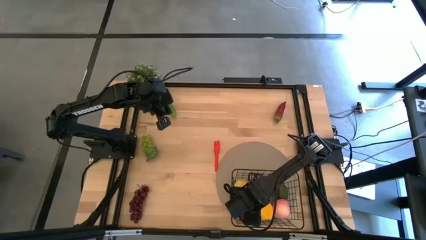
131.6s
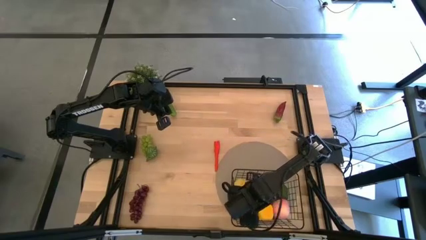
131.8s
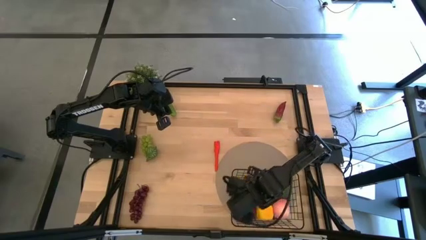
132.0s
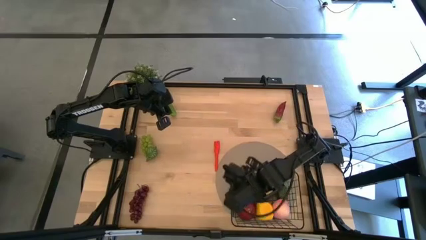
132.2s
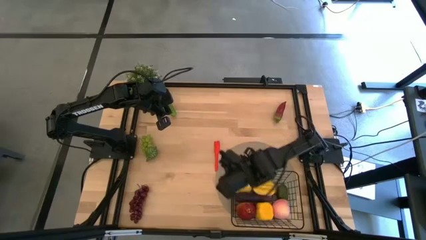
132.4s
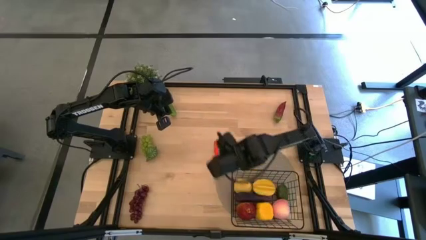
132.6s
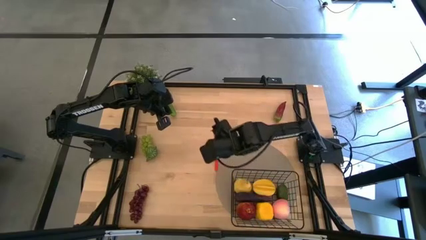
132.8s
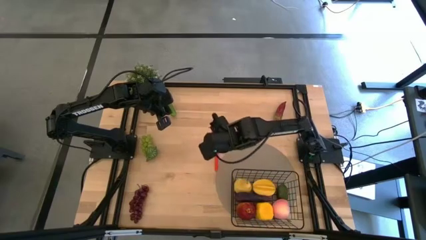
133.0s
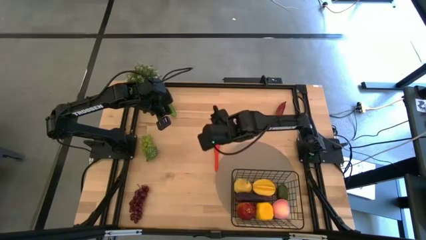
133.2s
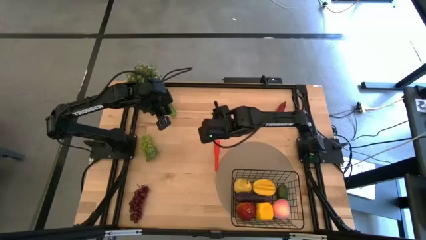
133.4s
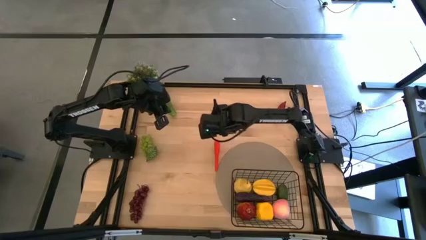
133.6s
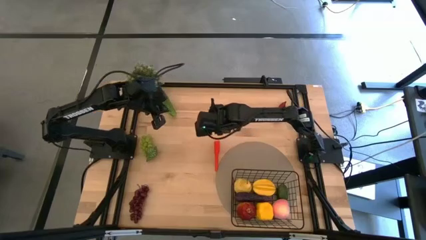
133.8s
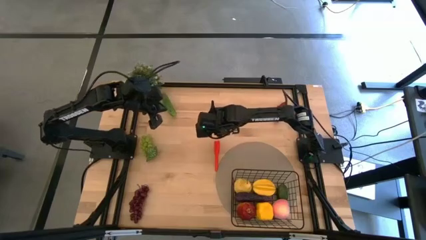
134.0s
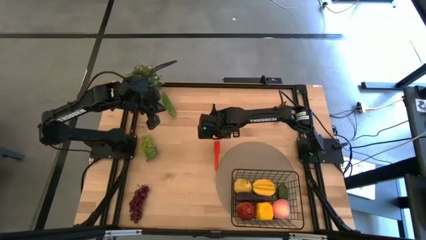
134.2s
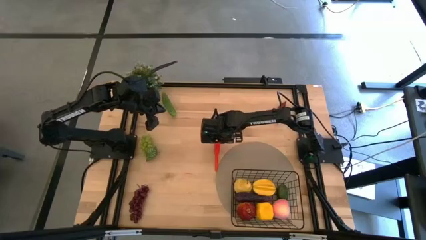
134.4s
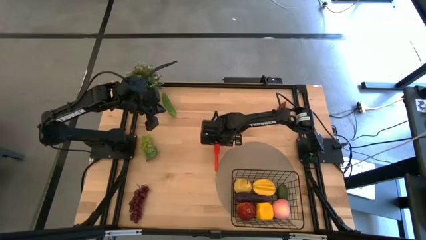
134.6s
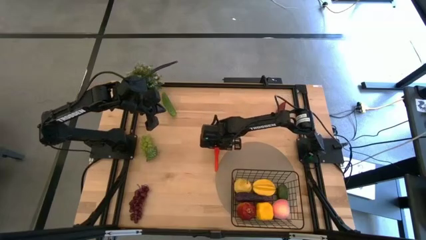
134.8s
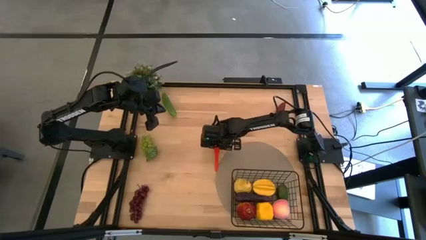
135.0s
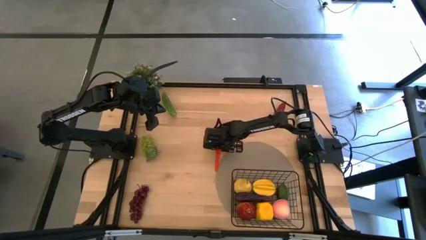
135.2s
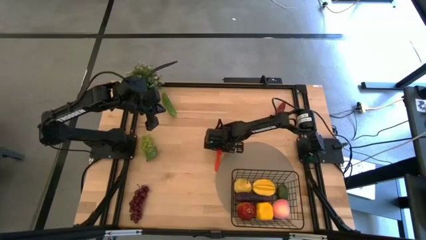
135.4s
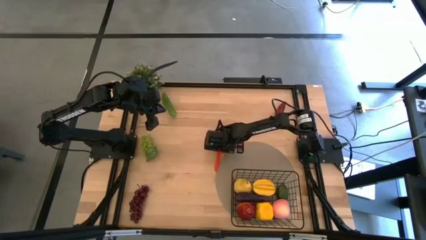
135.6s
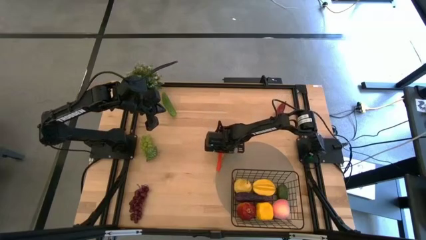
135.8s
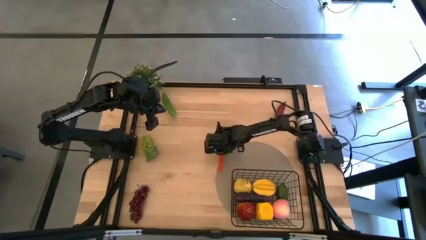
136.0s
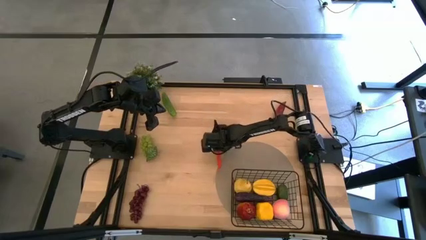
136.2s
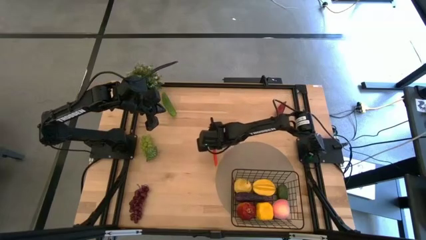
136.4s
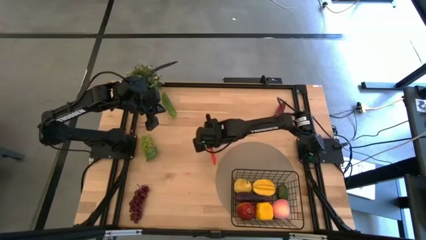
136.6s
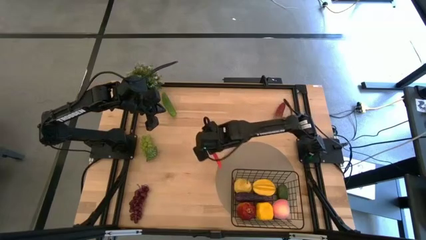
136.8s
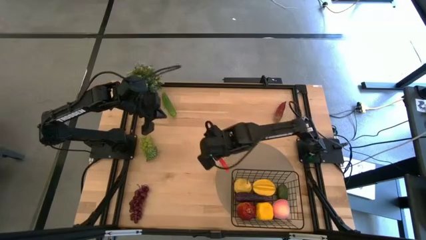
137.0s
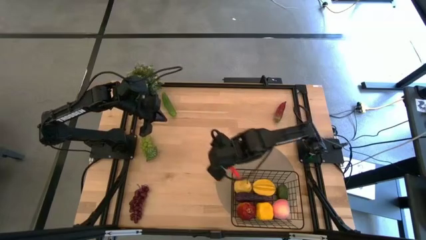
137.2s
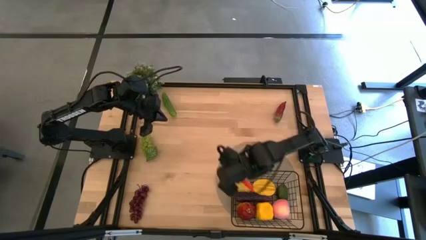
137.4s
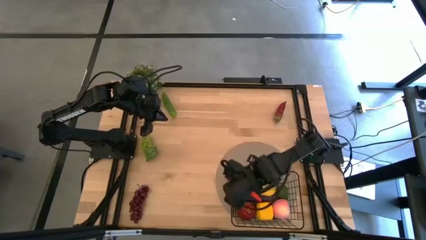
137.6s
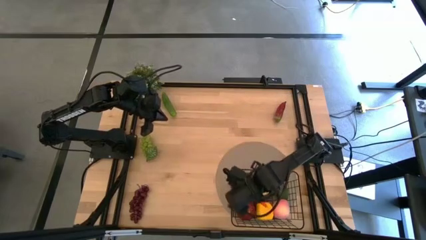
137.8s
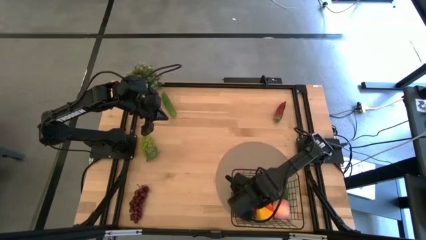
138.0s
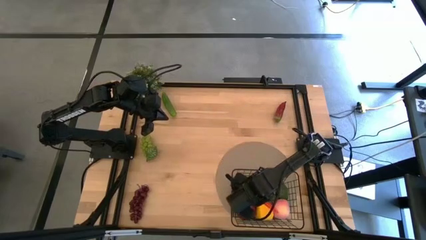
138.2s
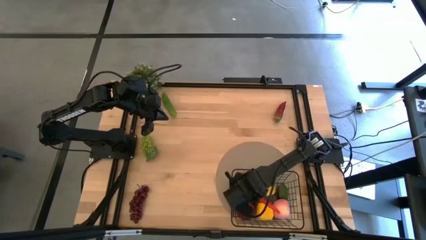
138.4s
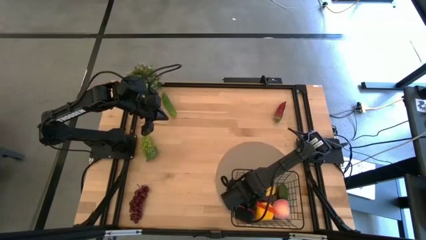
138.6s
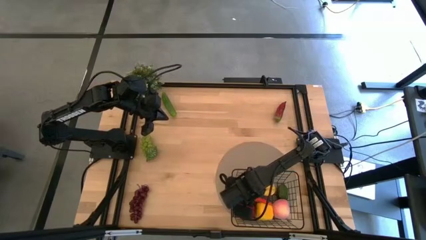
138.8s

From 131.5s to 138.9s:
Task: Build produce basket
Put the orange carrot into the wire basket

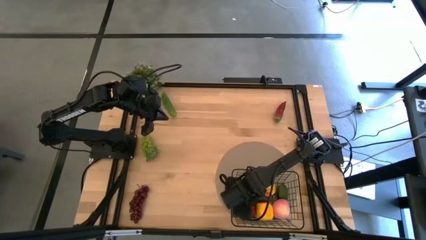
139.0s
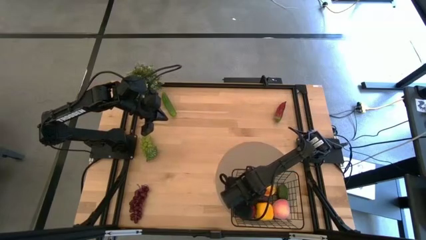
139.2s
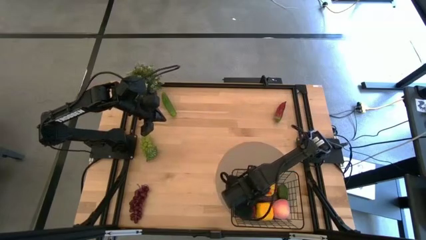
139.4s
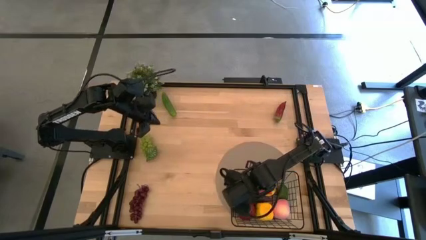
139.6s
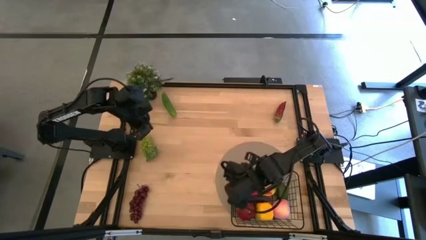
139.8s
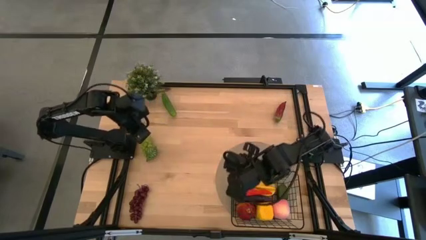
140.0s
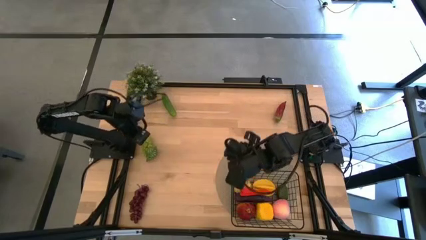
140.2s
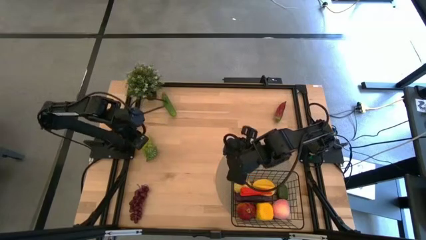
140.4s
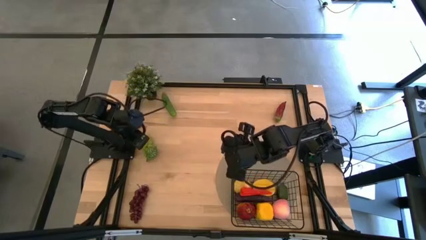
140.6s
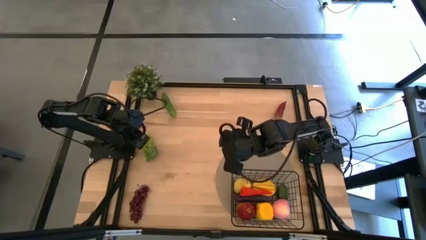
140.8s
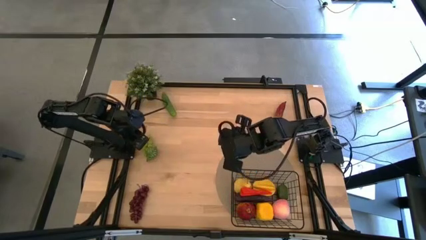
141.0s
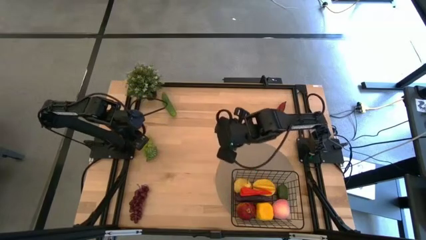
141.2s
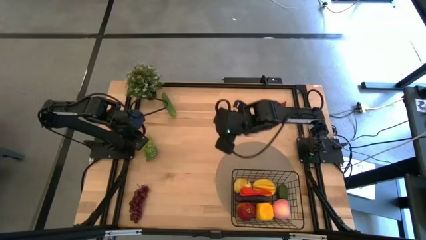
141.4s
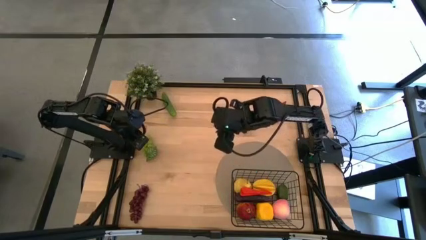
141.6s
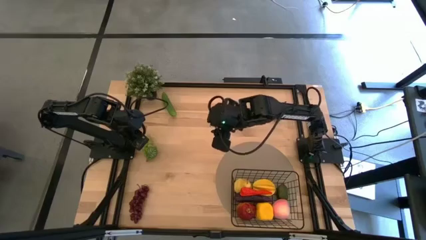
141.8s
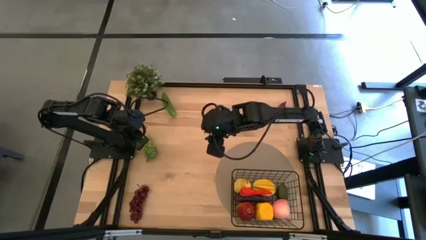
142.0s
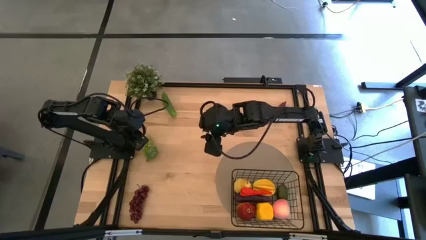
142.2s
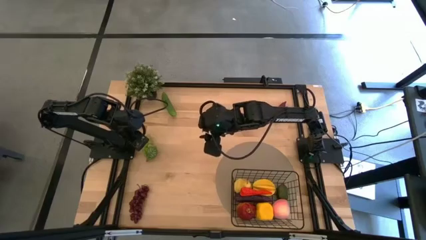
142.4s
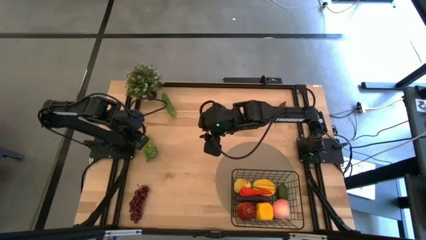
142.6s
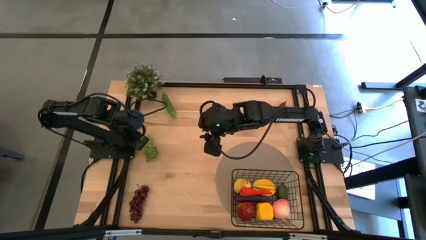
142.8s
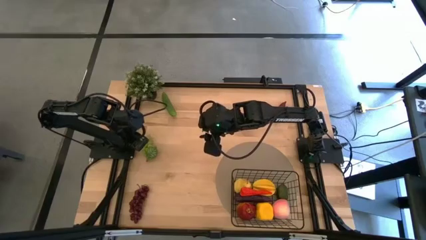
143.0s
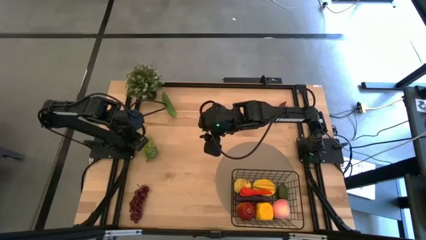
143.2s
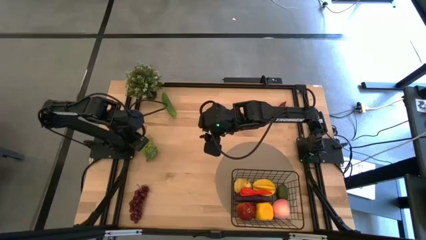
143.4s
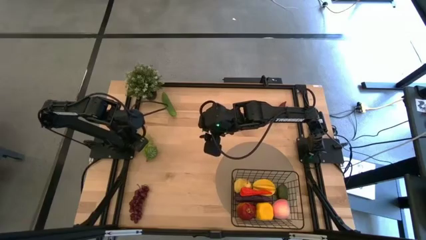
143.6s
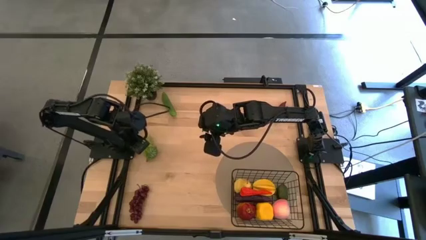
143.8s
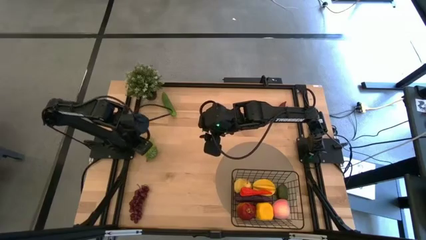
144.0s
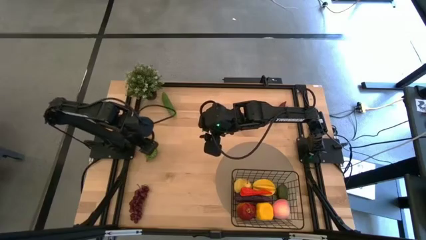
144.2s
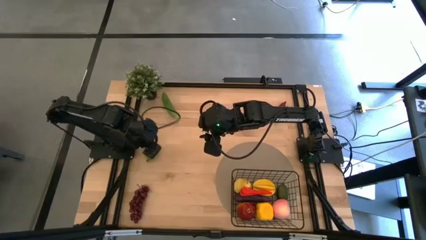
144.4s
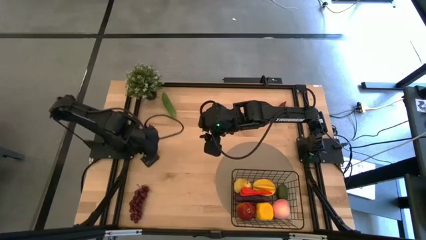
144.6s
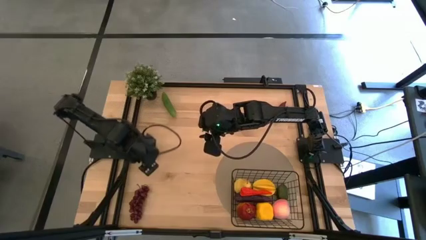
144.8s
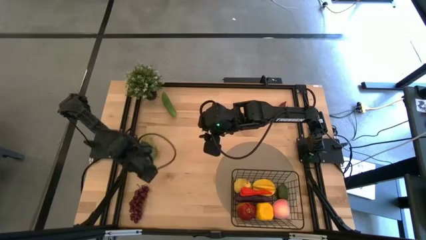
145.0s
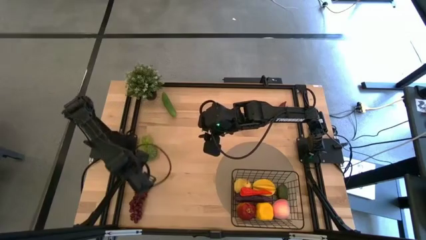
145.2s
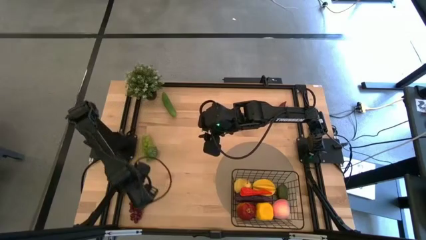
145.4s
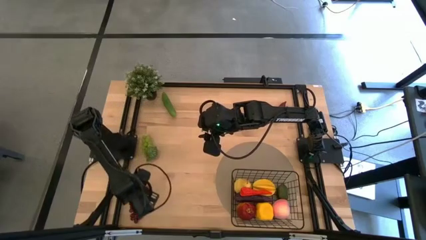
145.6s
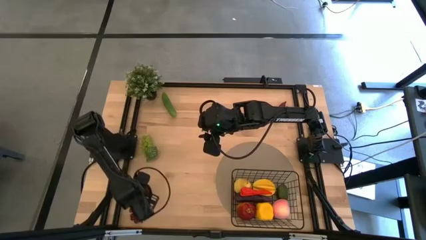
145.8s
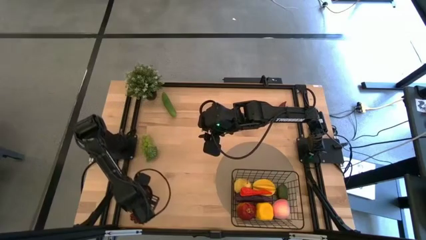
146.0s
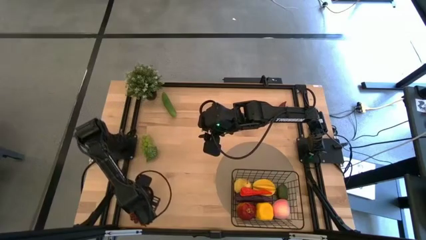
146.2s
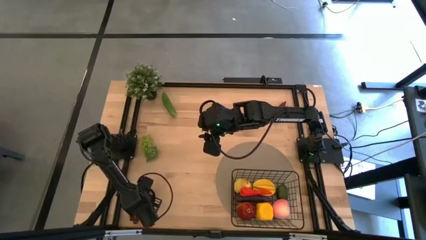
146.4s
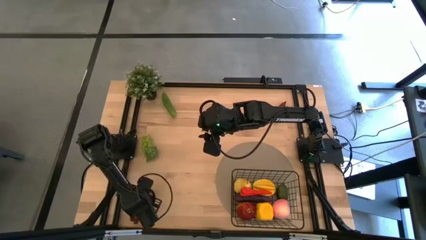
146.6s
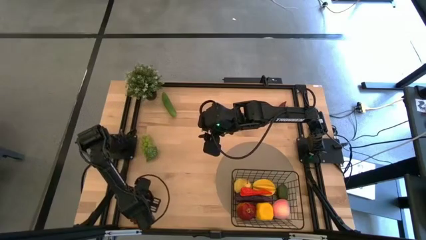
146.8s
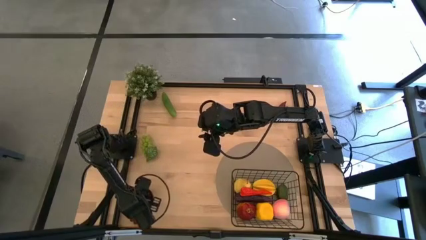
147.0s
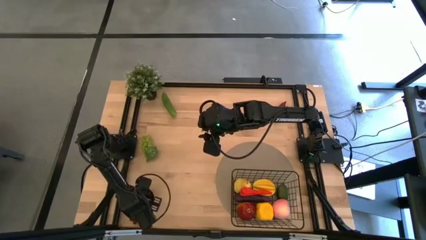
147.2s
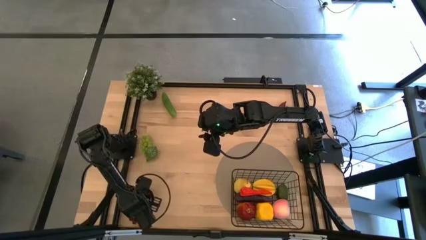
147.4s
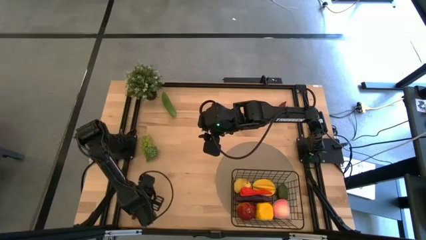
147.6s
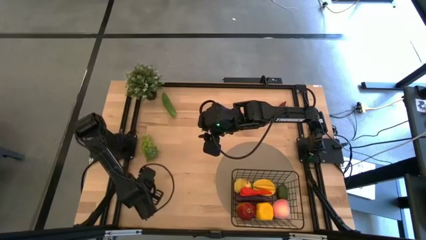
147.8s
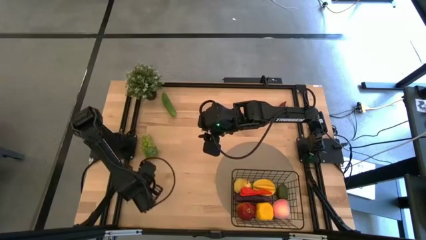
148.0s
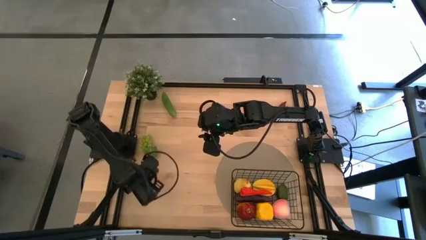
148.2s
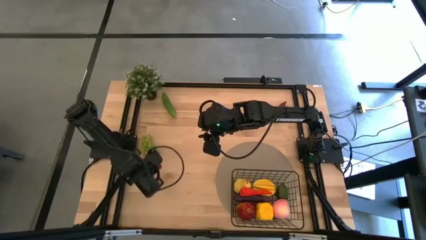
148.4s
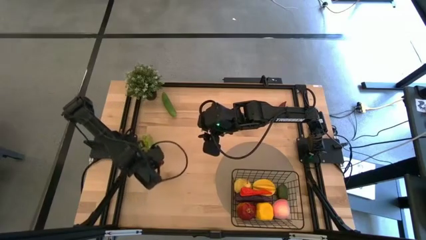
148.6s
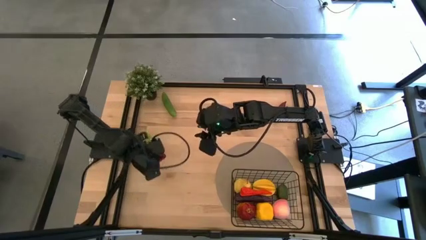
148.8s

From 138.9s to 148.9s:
Put the red grapes into the wire basket
